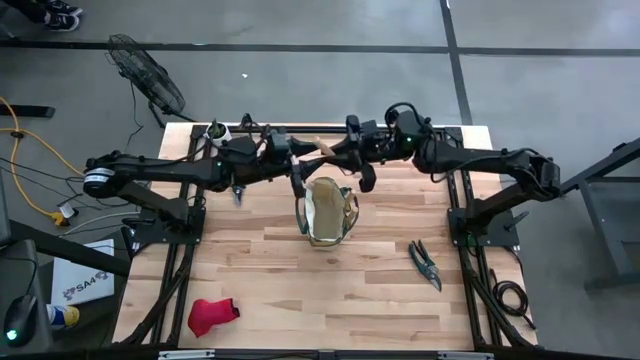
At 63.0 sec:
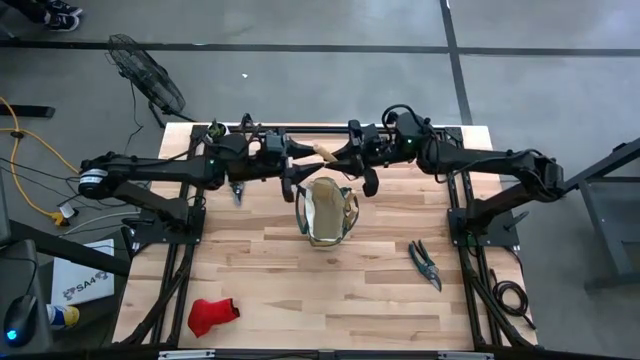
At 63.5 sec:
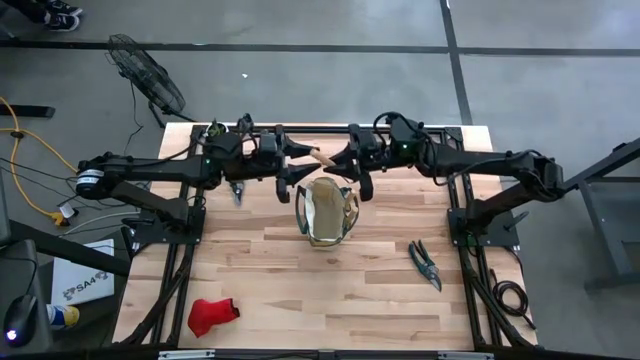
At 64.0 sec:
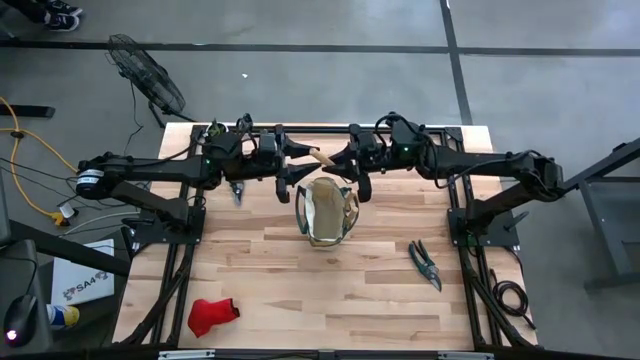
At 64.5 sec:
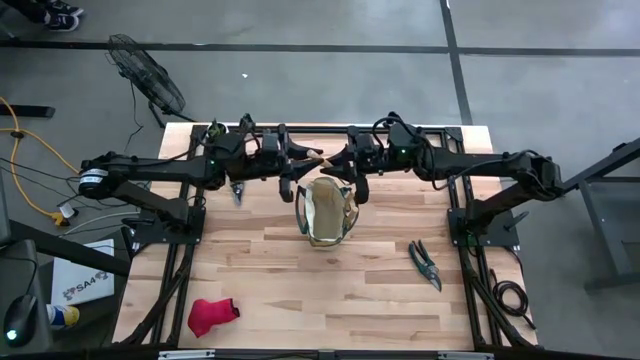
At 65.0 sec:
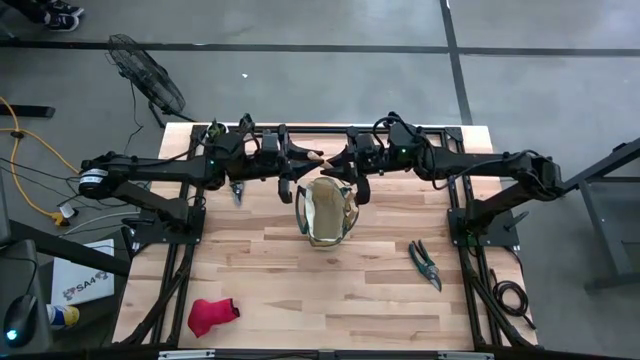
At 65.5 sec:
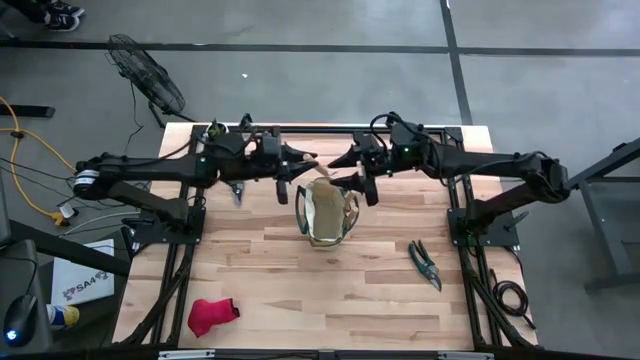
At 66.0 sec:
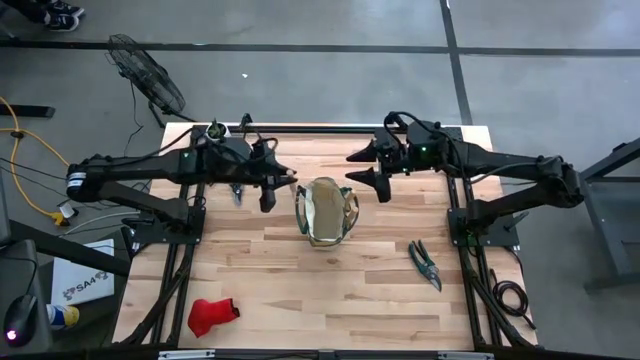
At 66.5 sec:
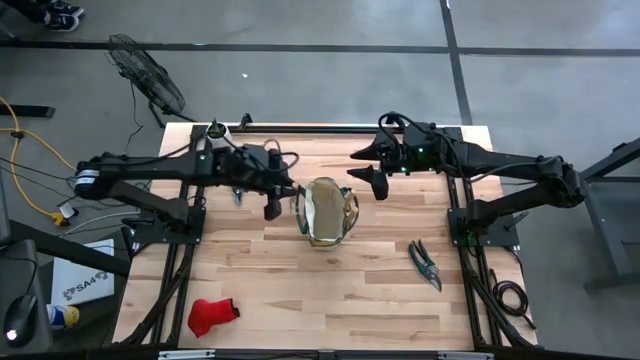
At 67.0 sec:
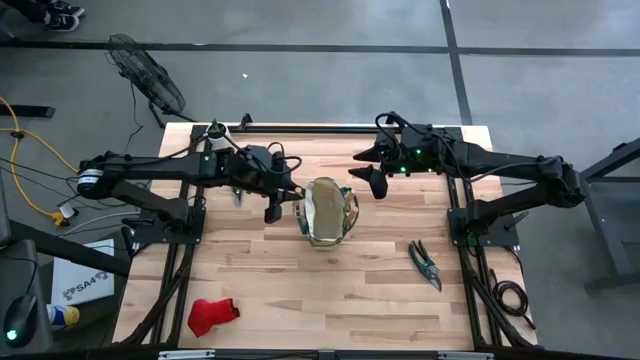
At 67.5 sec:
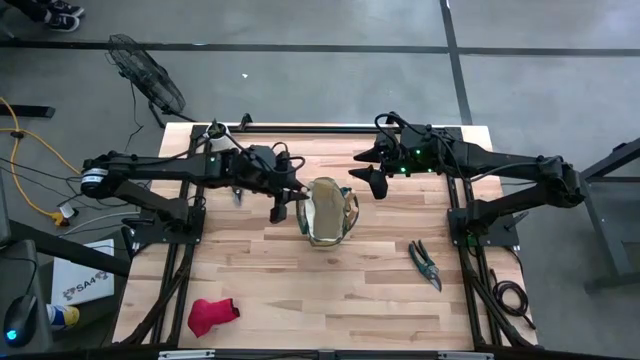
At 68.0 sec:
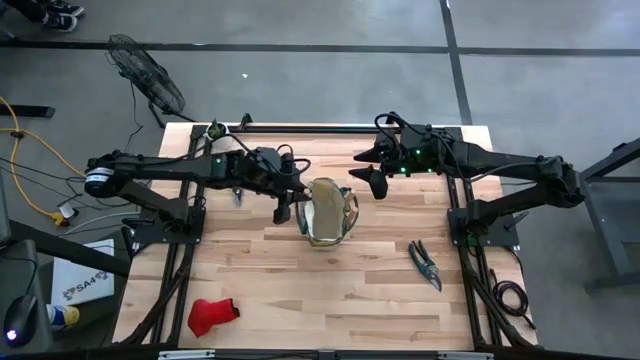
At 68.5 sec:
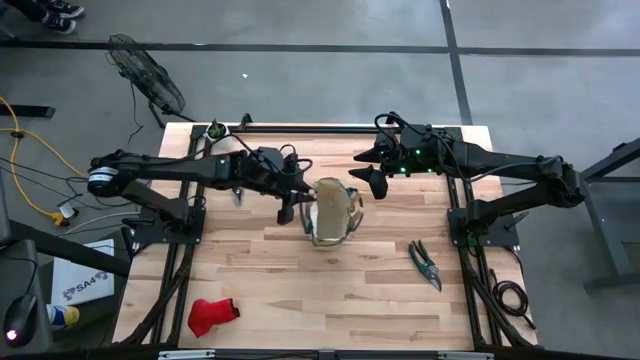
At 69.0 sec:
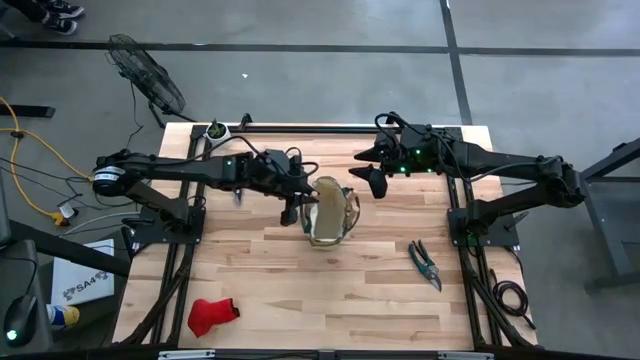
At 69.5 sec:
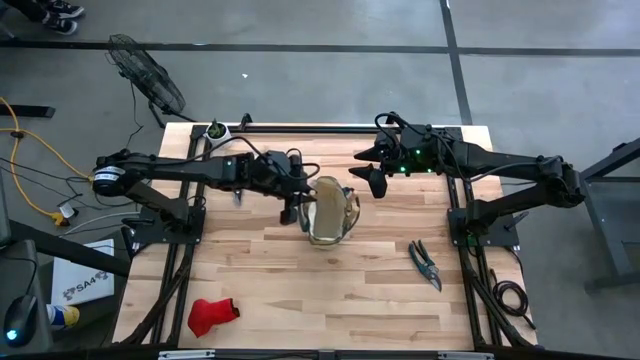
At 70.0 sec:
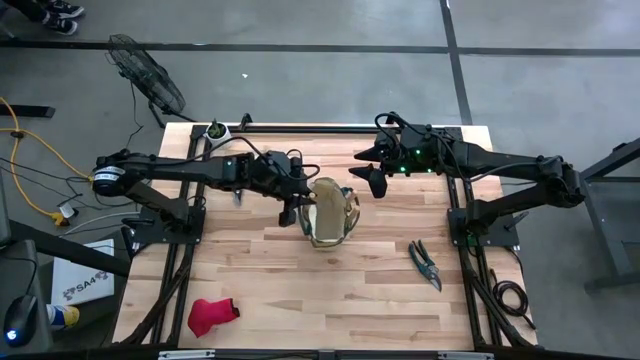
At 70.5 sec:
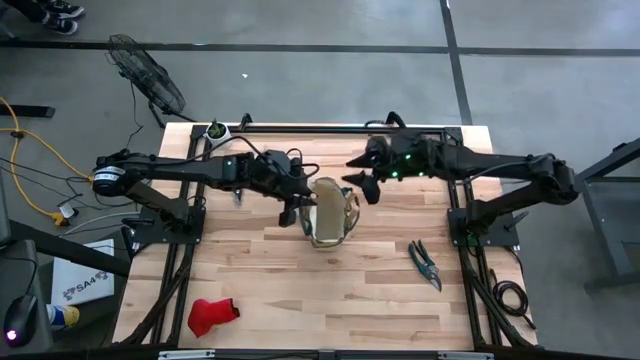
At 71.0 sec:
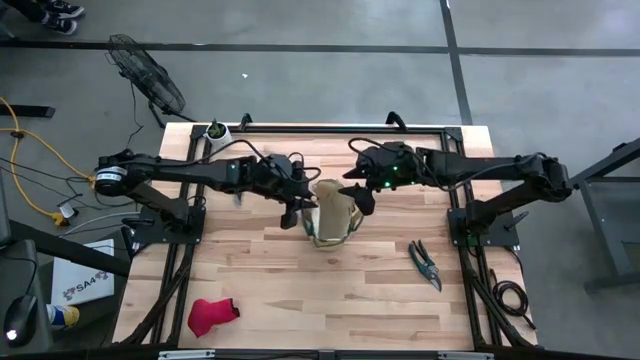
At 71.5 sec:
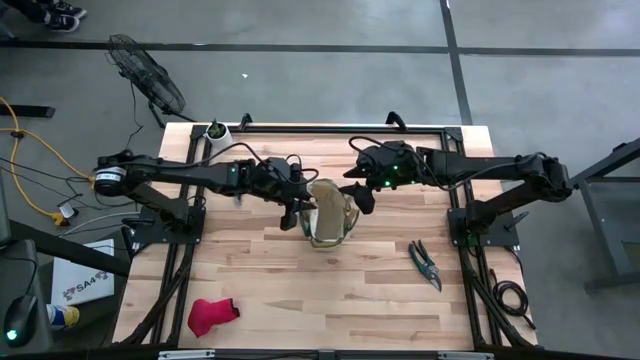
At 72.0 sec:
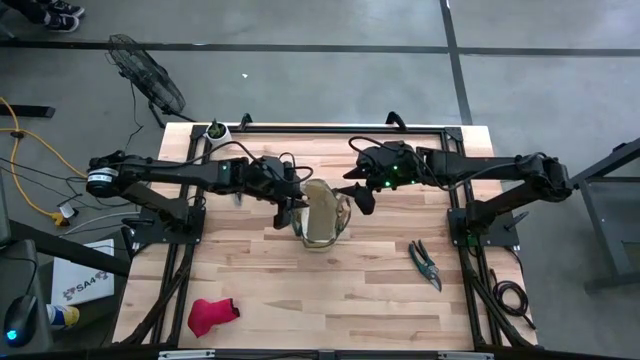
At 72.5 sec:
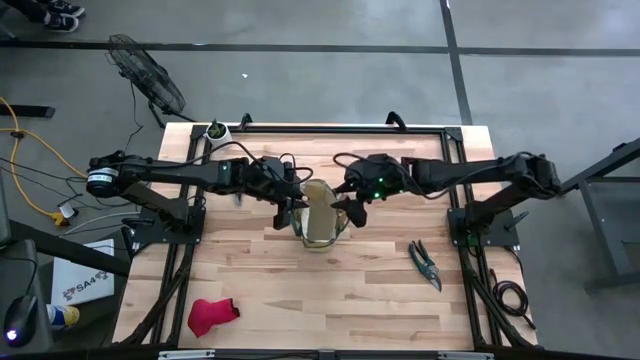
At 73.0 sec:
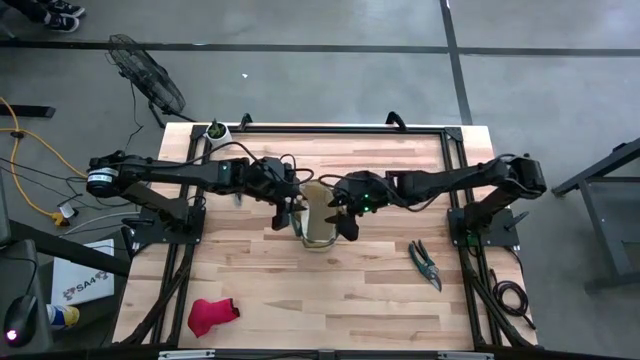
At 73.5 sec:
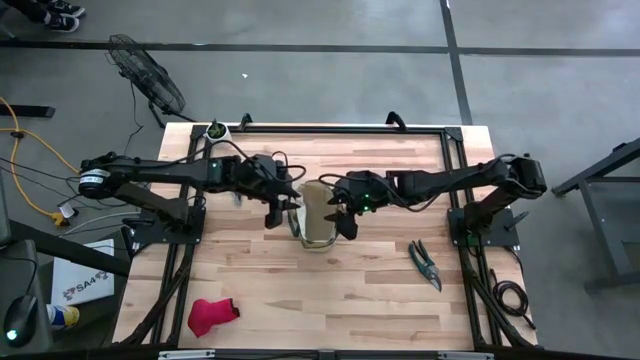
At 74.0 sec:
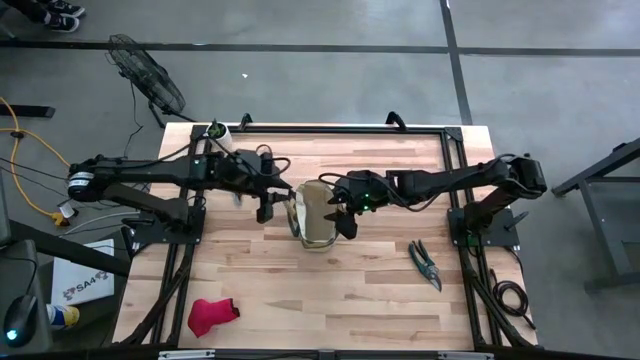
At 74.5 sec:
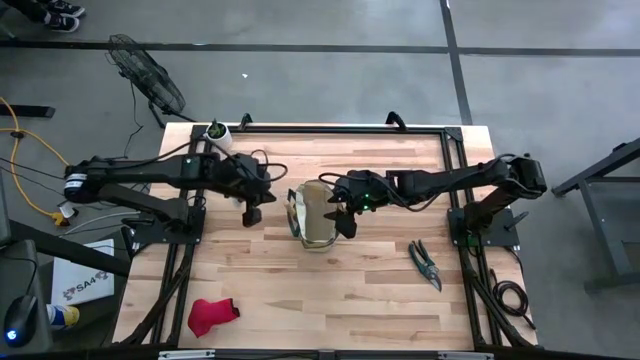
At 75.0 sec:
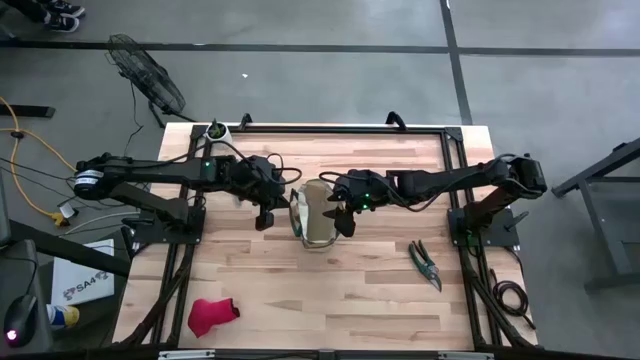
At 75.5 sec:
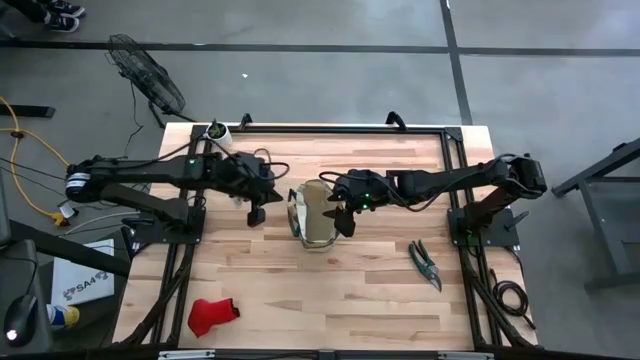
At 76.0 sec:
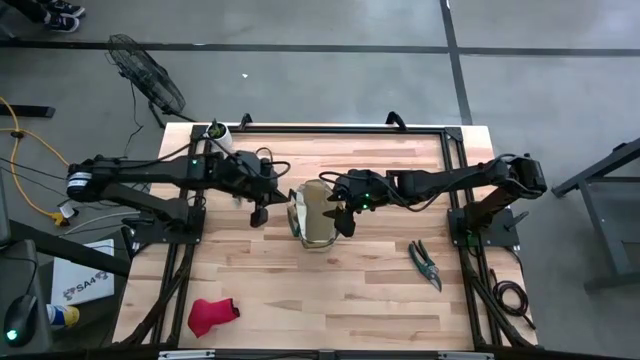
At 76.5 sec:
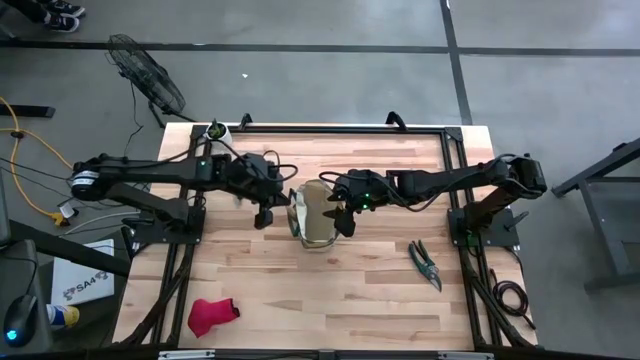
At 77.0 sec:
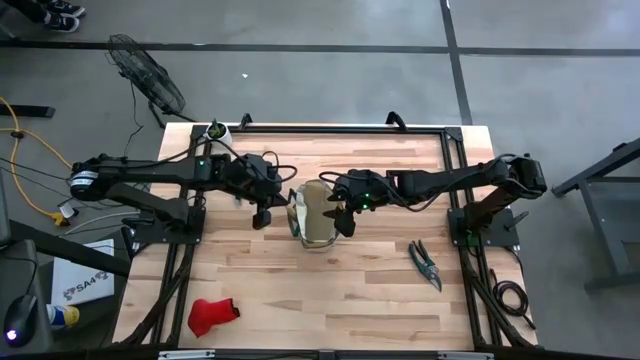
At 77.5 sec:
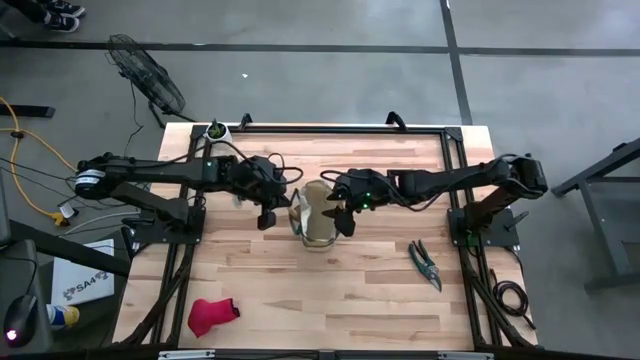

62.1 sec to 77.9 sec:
Task: Pick & Place Garden tools in Gardening bag
Put the hand rake into the gardening bag
